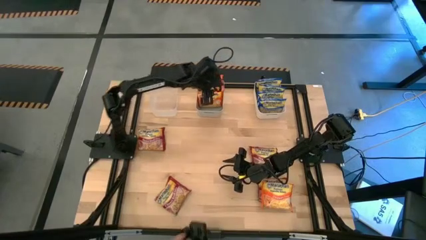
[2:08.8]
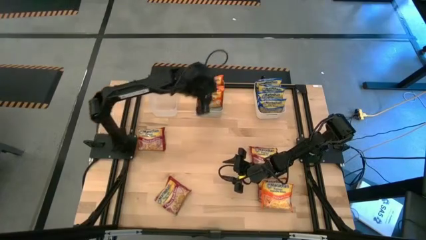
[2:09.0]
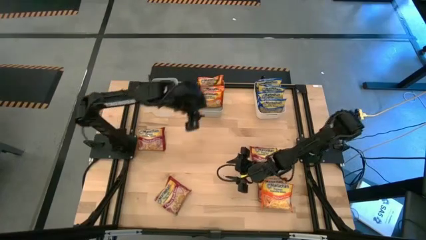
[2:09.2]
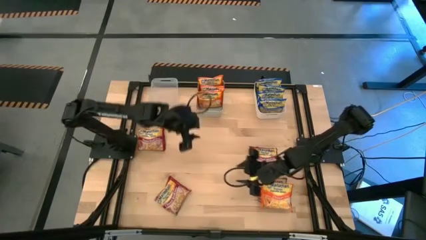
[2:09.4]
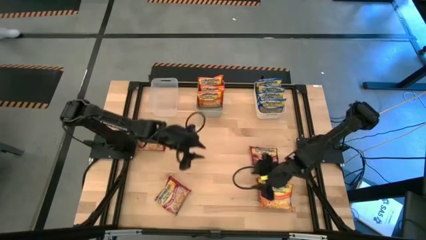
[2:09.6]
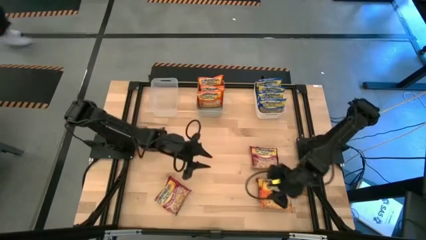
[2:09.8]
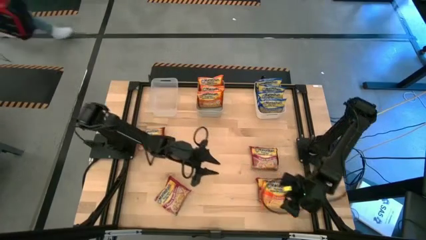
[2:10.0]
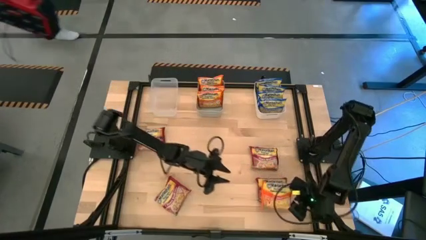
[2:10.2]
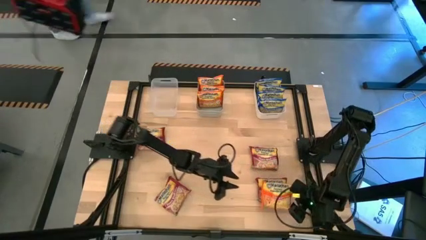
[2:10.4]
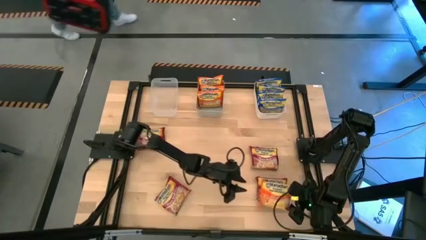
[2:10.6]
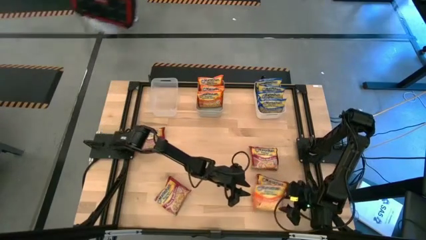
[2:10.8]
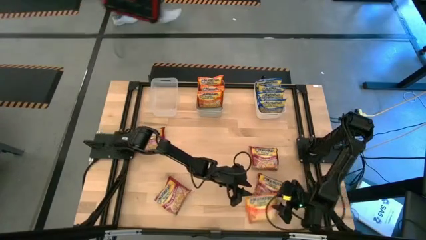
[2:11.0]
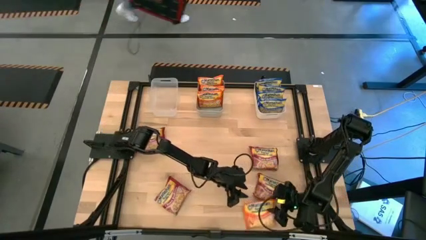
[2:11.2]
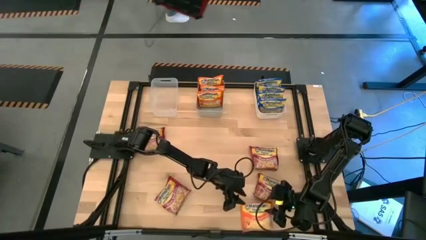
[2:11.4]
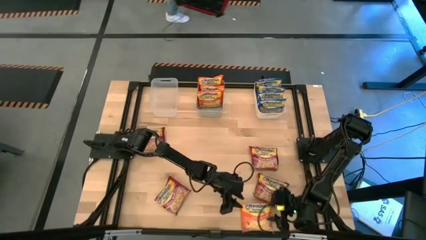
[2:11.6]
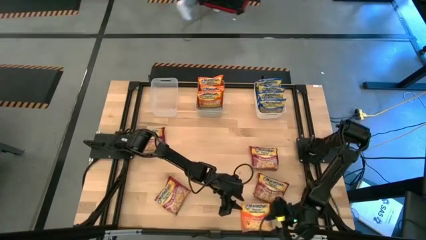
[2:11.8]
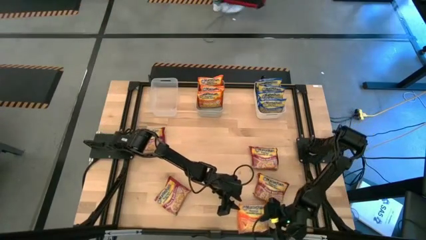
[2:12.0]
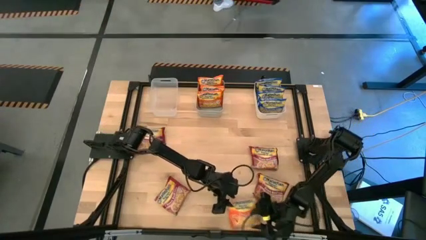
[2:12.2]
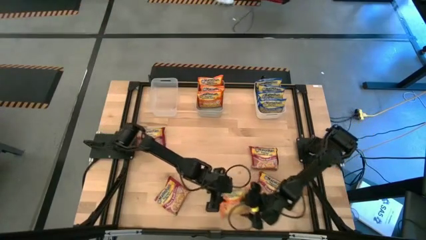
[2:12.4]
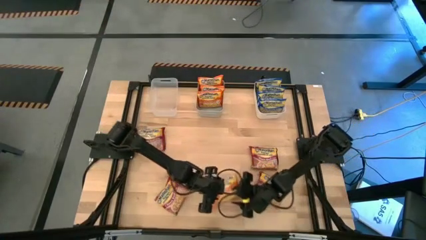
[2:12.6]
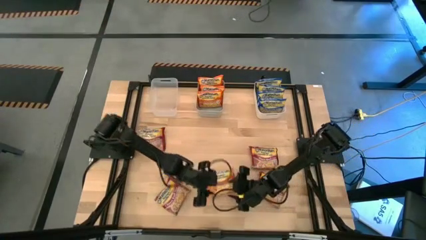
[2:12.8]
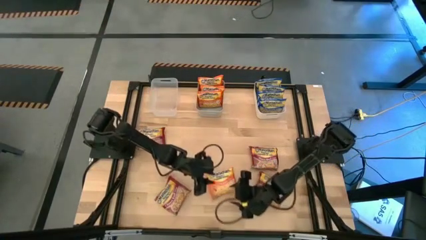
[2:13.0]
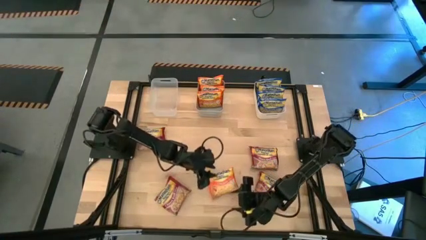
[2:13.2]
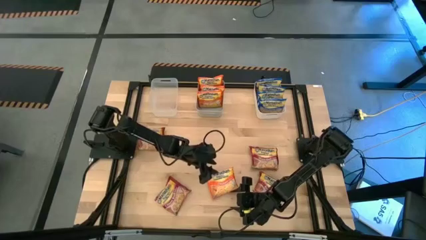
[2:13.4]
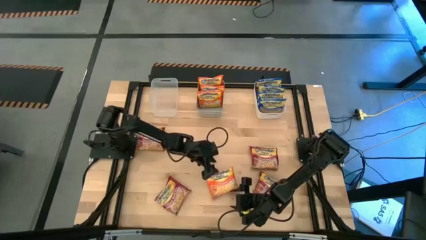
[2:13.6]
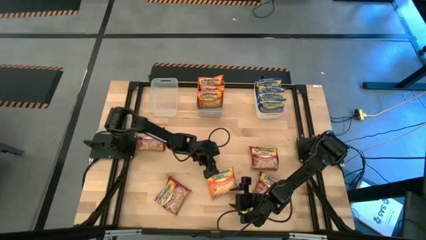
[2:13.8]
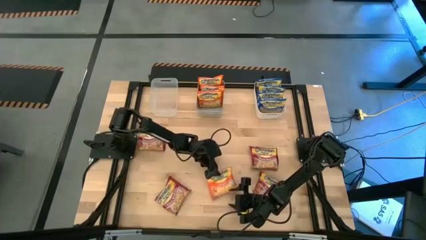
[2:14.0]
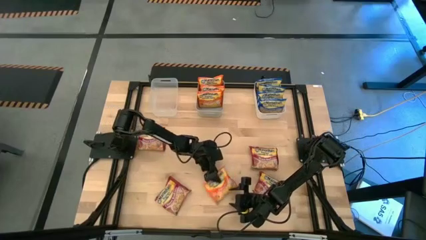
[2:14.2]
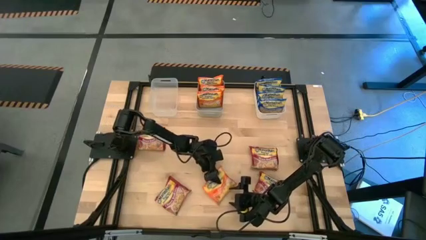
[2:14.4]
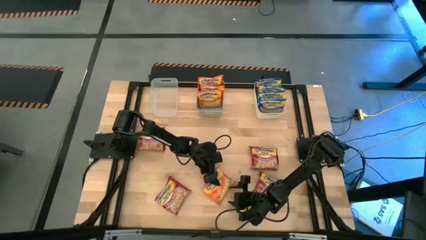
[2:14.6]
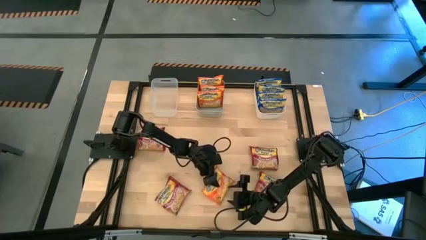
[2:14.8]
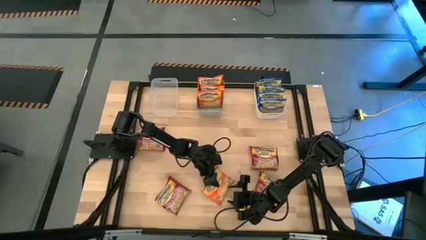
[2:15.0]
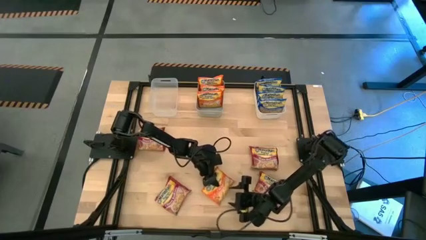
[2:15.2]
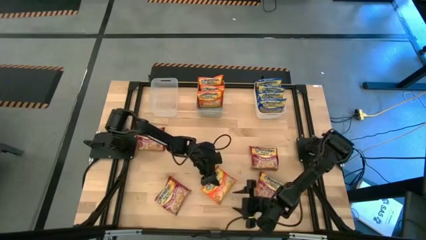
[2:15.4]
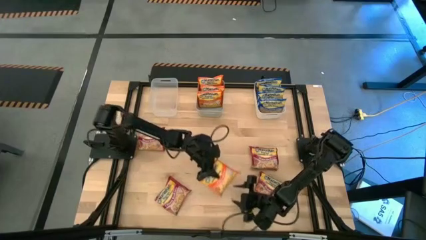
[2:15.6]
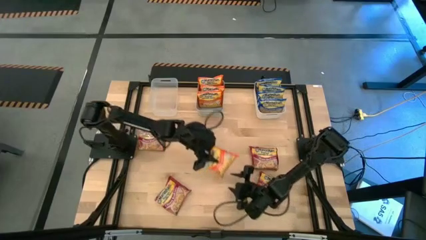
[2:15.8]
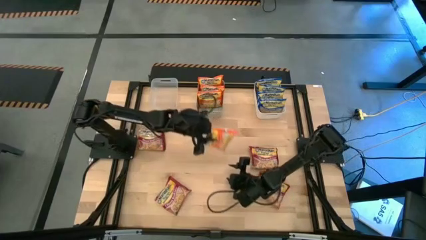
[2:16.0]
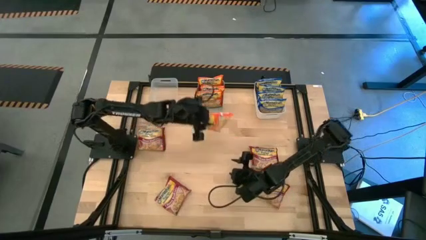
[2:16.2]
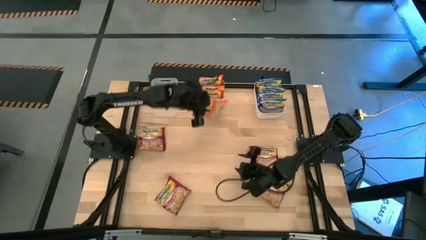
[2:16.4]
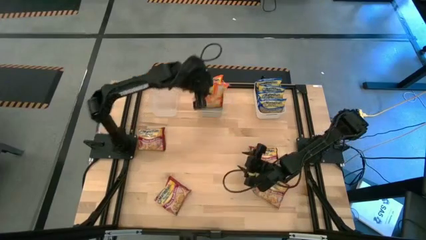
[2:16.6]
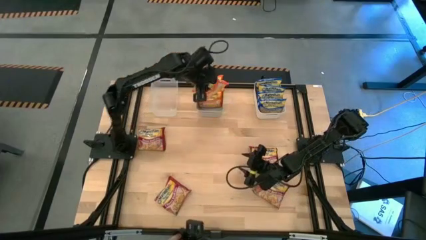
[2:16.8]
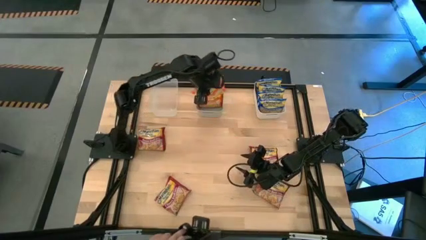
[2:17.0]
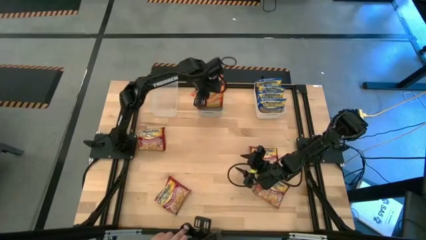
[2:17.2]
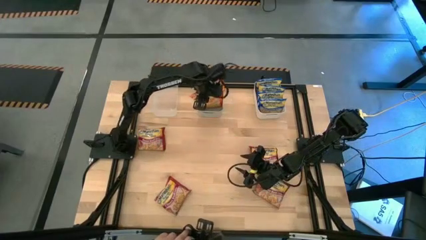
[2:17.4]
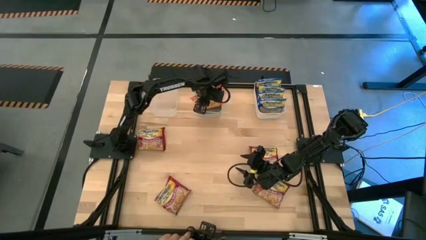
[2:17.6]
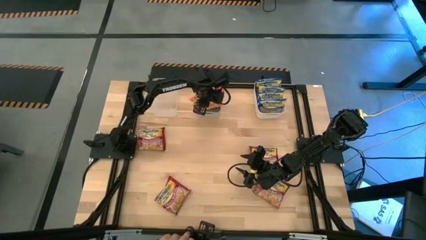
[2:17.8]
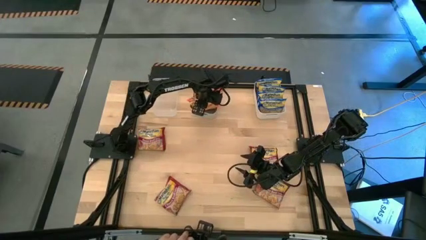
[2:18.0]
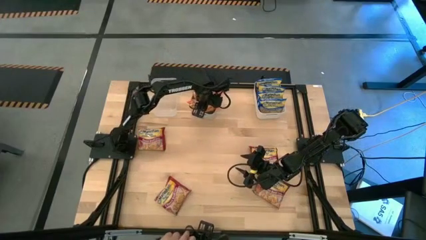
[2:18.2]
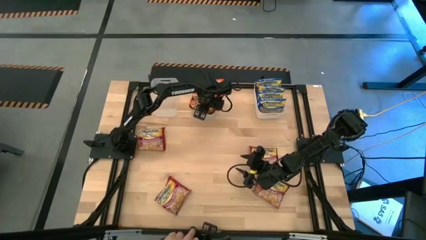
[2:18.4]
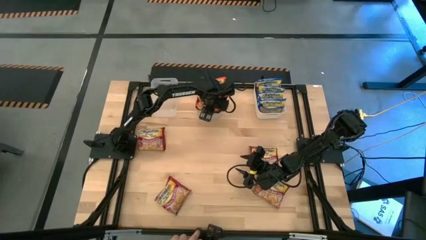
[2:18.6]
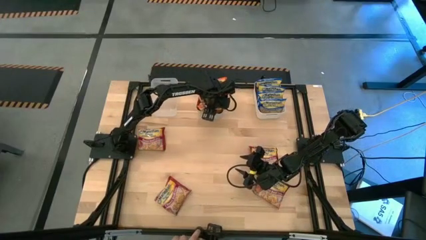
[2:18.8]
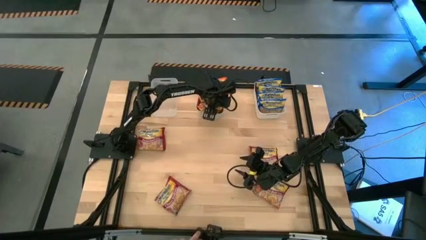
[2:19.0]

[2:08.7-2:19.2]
Task: Sort Maruchan noodles
Put the orange noodle pack into the gray bin

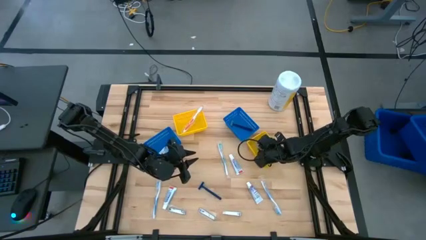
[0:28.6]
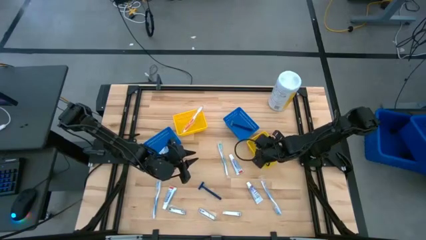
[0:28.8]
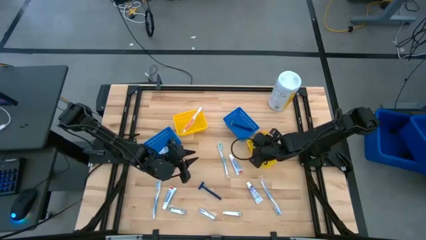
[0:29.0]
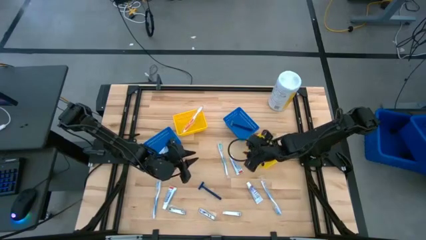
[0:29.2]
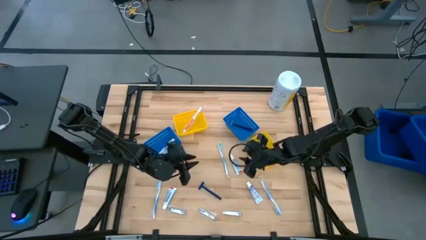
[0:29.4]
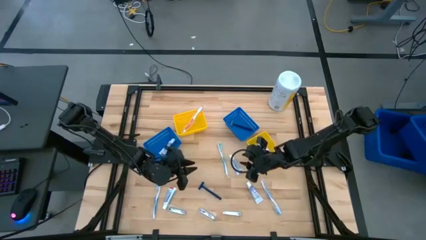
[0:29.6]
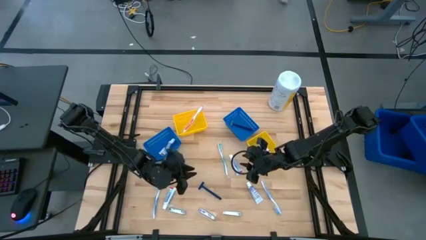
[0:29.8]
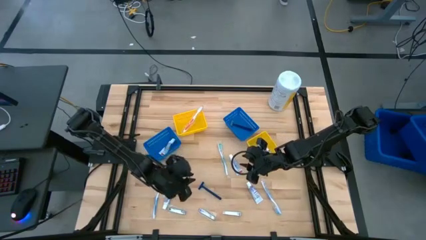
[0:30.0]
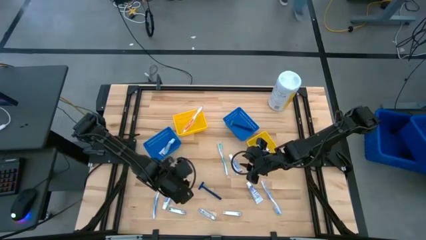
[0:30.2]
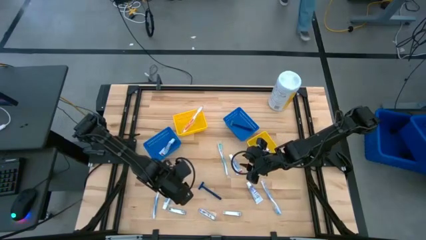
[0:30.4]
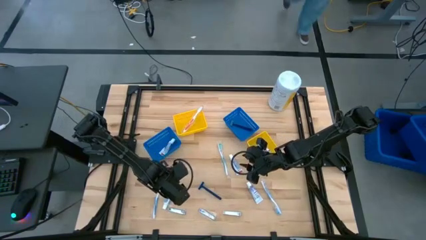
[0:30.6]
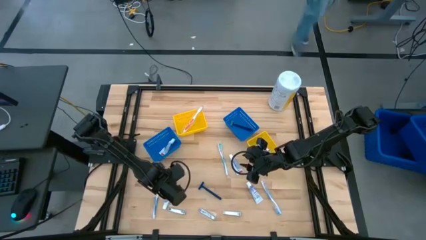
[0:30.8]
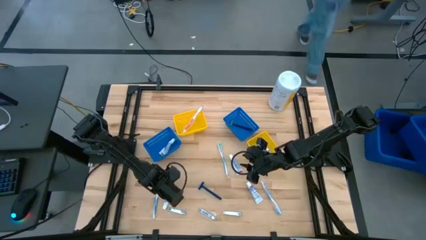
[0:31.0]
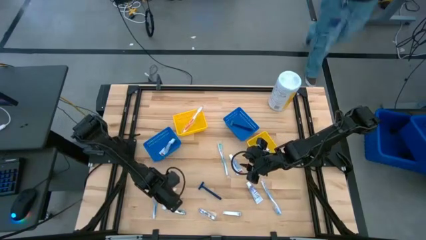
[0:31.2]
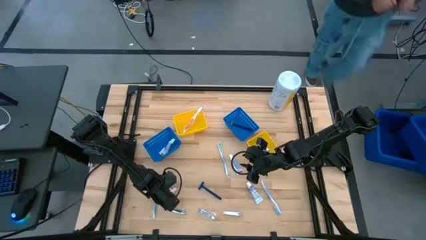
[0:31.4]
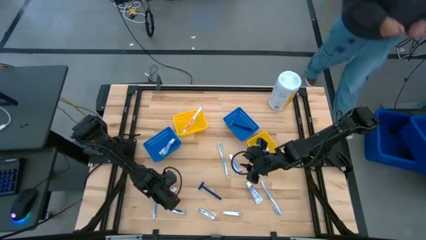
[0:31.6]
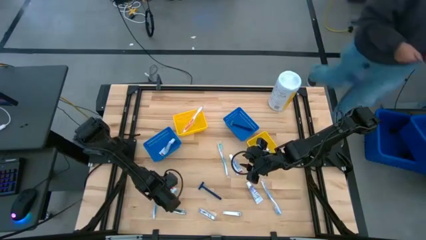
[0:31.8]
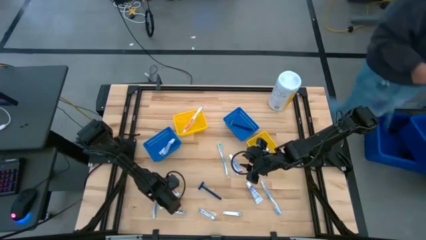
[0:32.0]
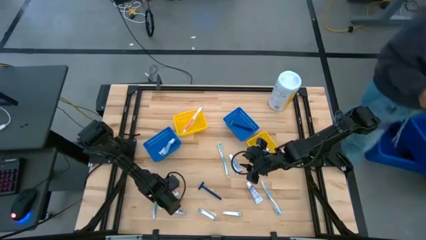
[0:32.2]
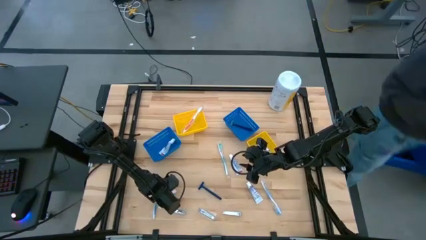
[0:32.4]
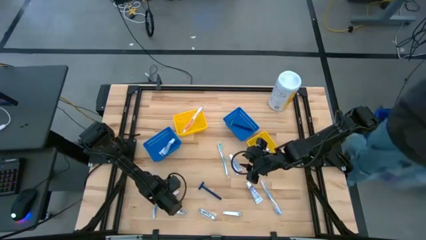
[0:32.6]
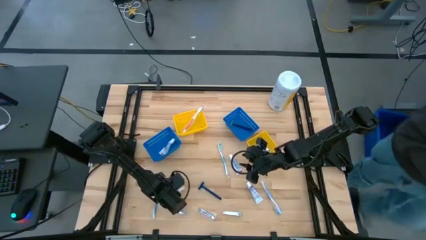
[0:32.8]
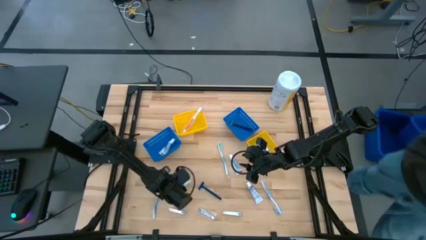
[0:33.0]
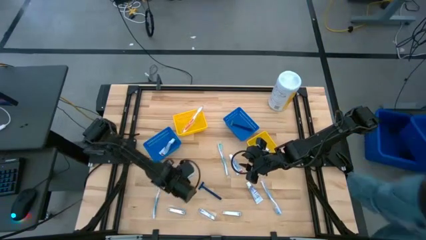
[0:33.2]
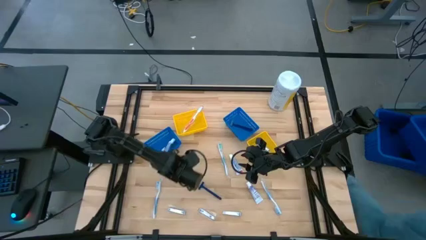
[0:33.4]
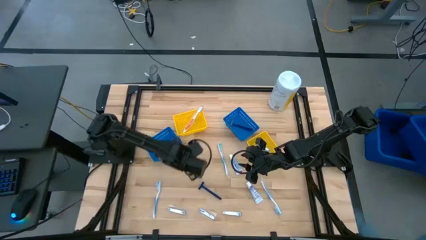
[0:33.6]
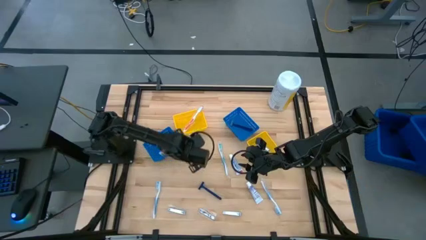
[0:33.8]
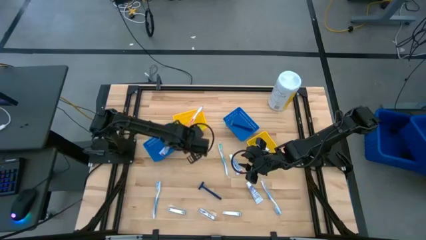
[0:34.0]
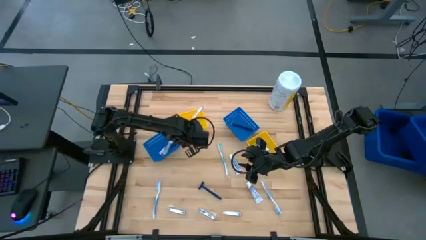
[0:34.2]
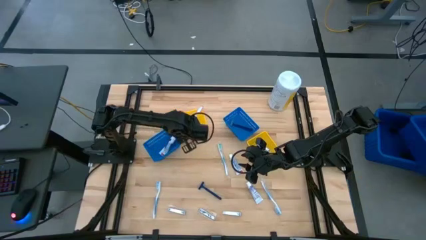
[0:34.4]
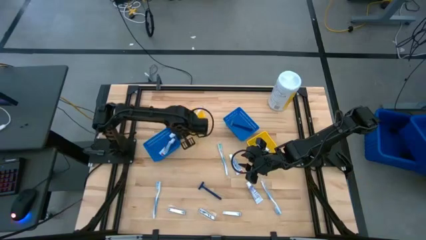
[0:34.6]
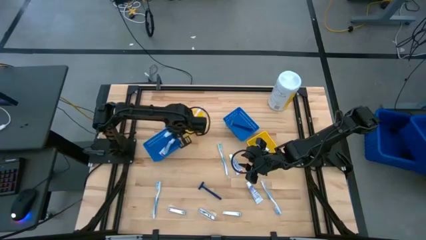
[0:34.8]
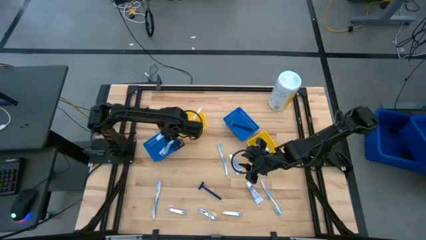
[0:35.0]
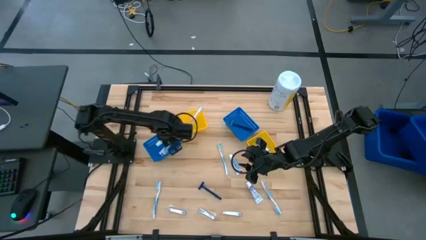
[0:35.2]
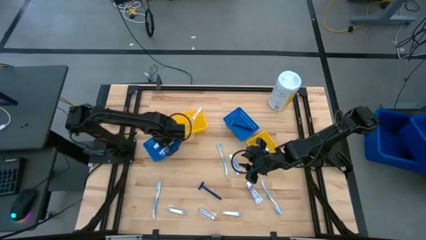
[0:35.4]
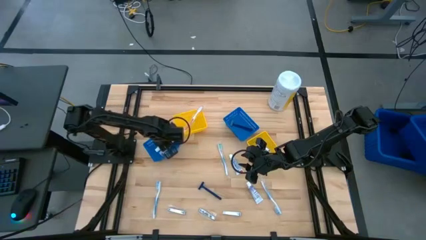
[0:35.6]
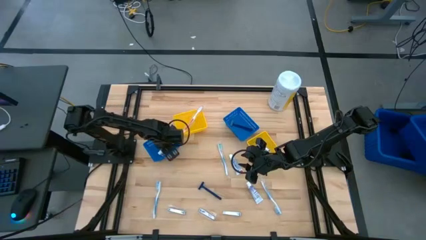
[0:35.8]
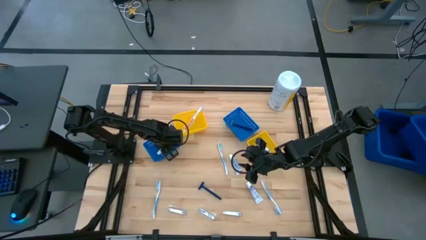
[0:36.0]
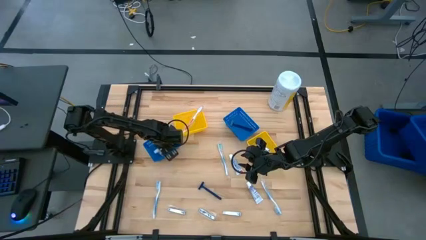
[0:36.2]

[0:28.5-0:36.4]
Task: Pick & Place Travel size toiletries
Put the toothpaste into the left blue bin
